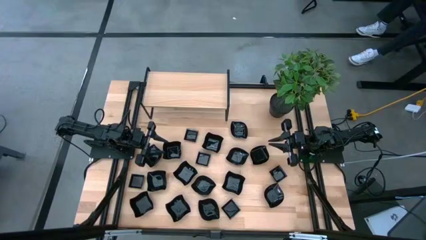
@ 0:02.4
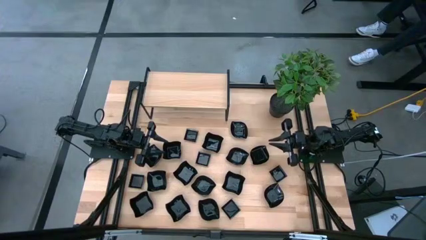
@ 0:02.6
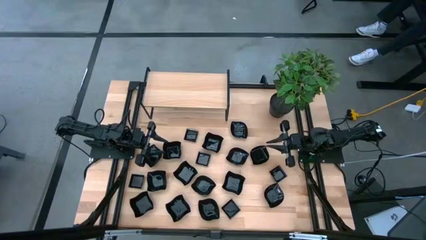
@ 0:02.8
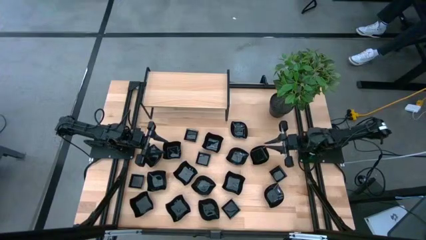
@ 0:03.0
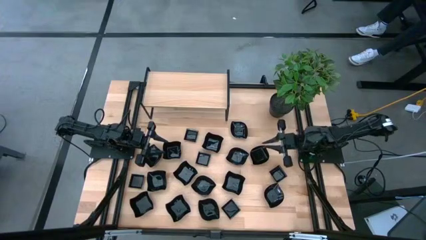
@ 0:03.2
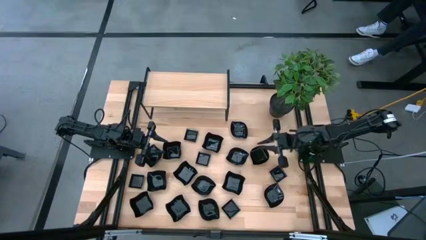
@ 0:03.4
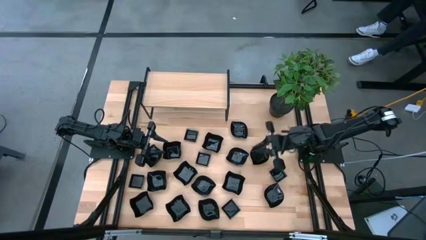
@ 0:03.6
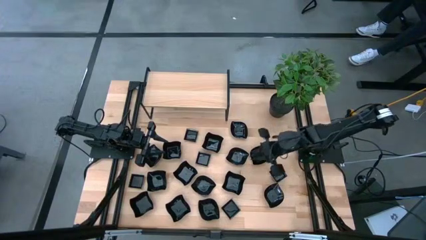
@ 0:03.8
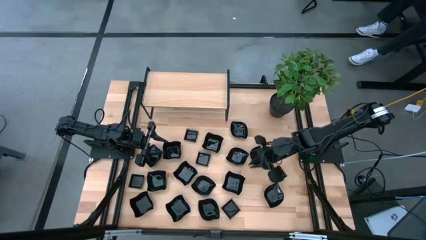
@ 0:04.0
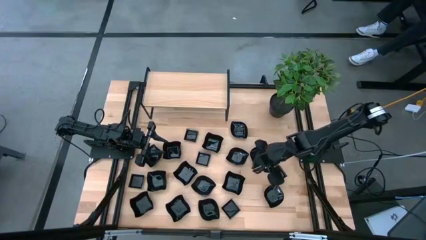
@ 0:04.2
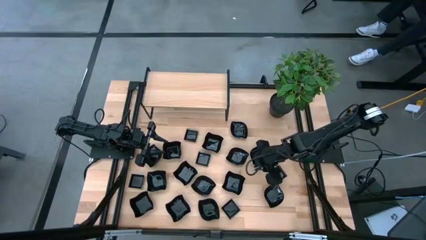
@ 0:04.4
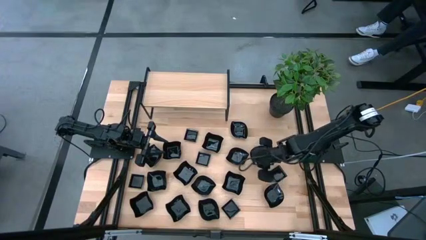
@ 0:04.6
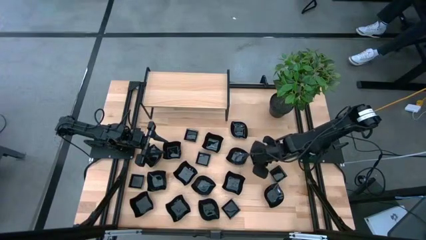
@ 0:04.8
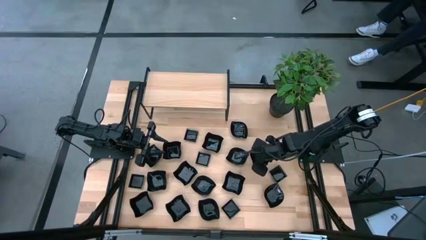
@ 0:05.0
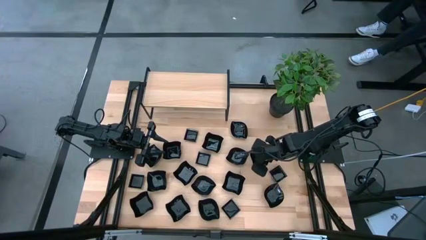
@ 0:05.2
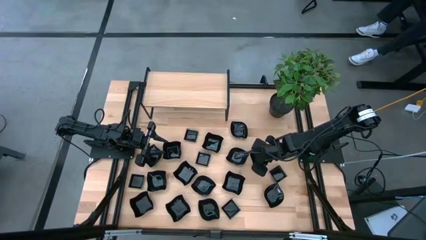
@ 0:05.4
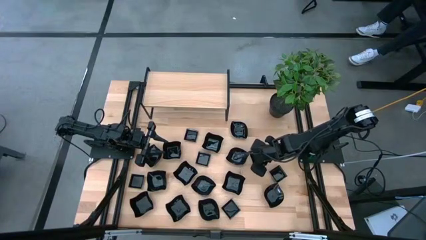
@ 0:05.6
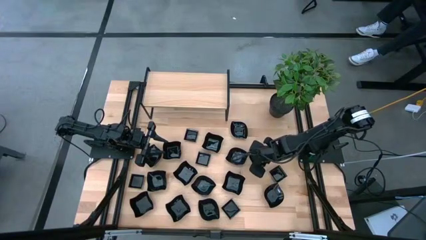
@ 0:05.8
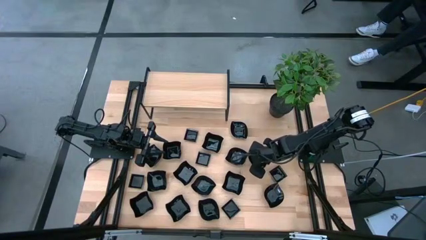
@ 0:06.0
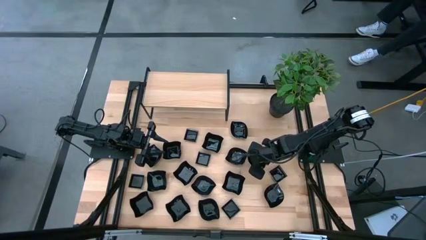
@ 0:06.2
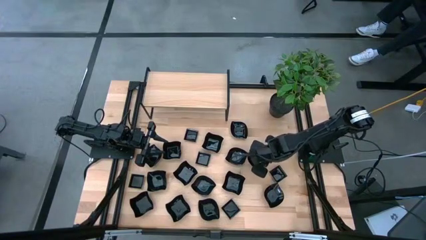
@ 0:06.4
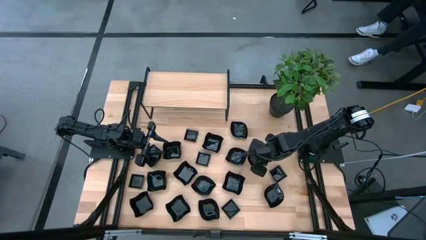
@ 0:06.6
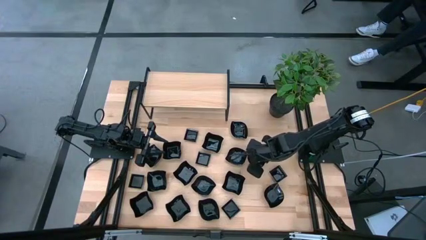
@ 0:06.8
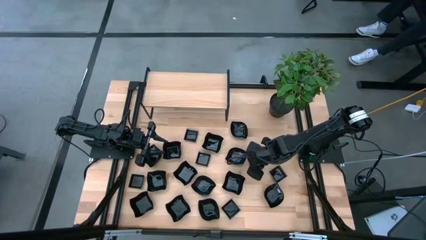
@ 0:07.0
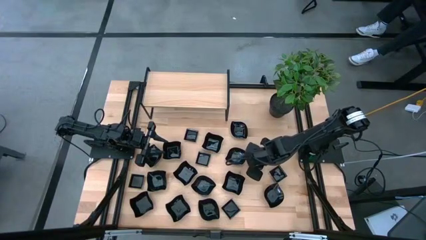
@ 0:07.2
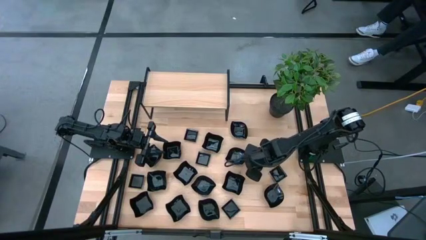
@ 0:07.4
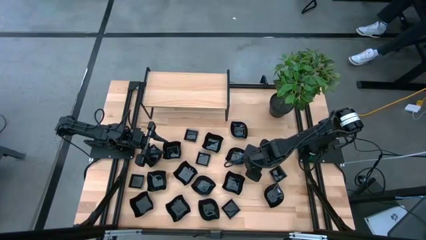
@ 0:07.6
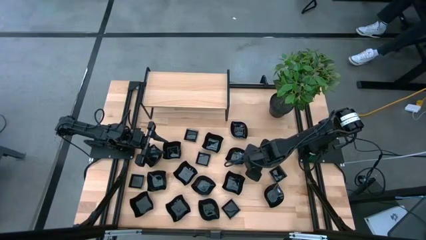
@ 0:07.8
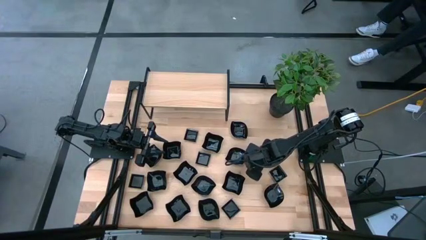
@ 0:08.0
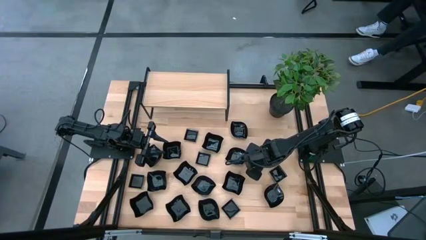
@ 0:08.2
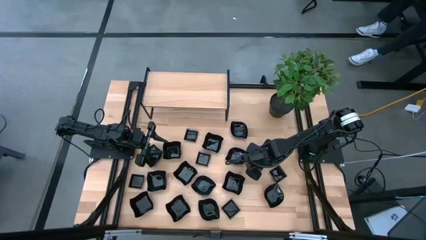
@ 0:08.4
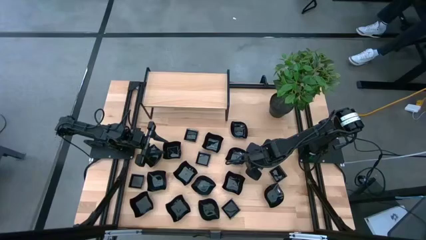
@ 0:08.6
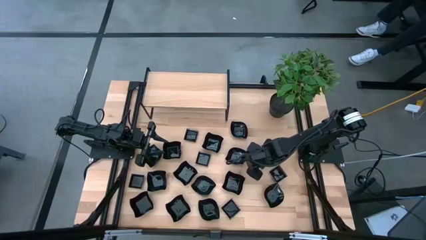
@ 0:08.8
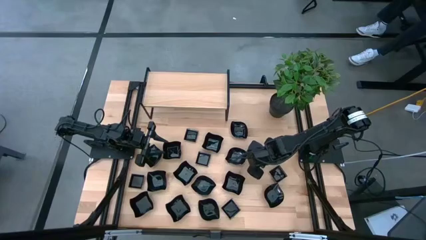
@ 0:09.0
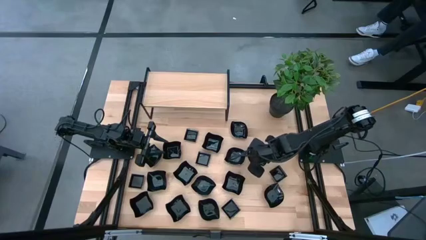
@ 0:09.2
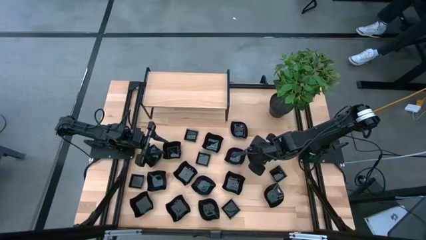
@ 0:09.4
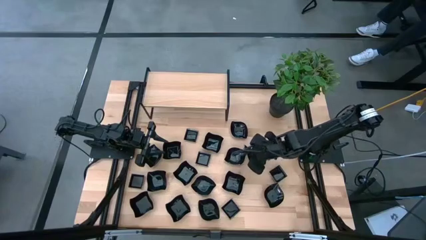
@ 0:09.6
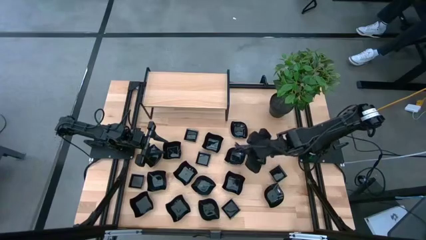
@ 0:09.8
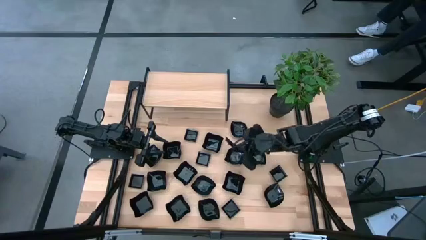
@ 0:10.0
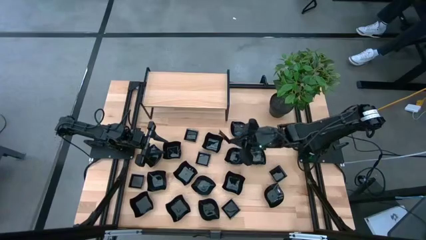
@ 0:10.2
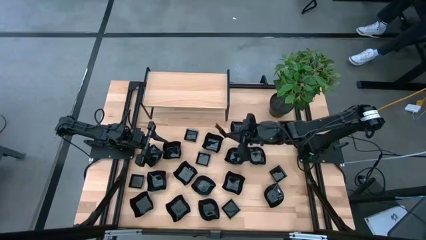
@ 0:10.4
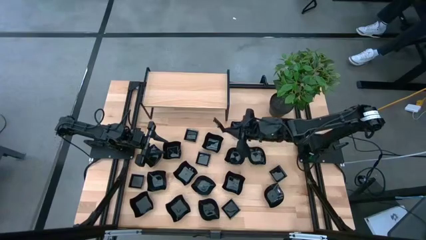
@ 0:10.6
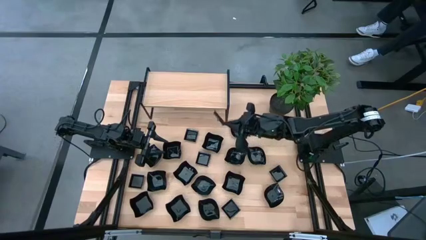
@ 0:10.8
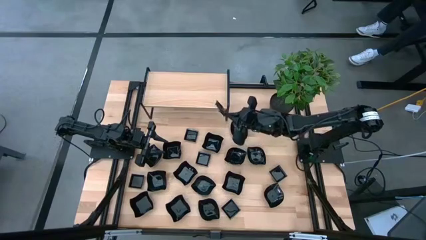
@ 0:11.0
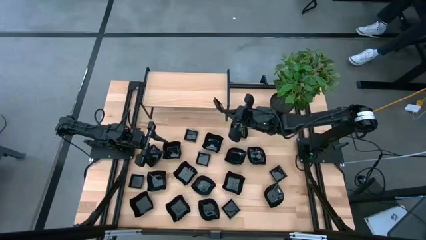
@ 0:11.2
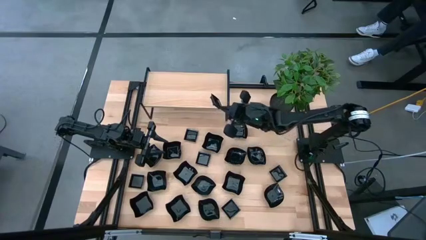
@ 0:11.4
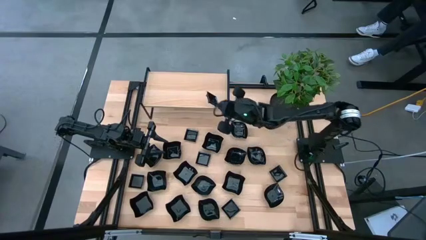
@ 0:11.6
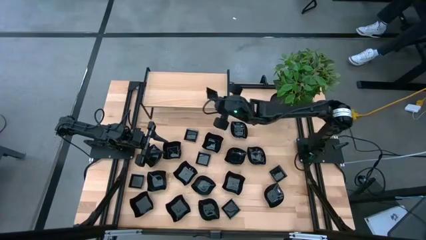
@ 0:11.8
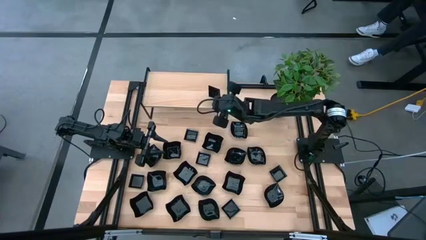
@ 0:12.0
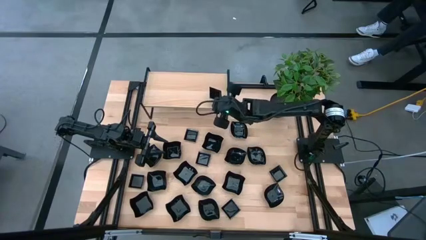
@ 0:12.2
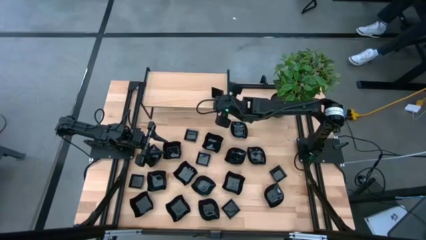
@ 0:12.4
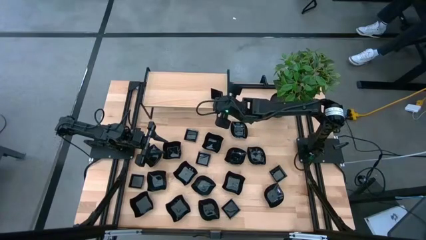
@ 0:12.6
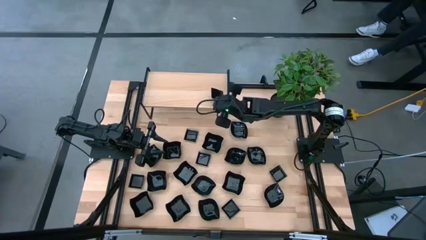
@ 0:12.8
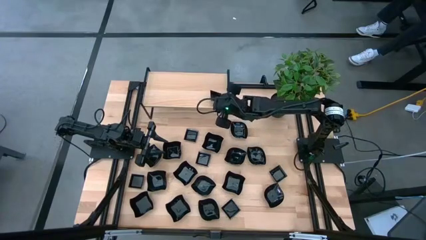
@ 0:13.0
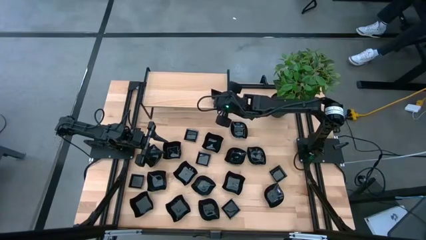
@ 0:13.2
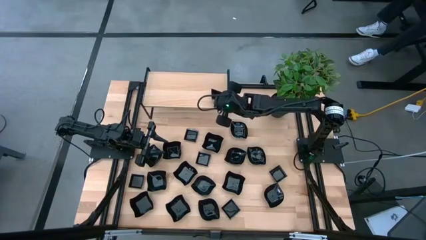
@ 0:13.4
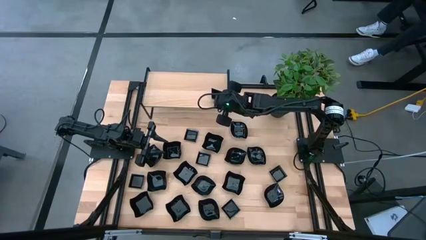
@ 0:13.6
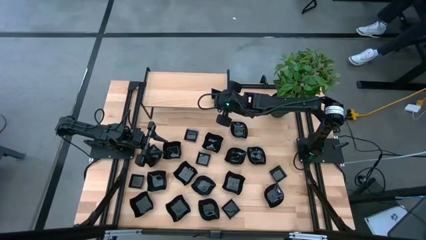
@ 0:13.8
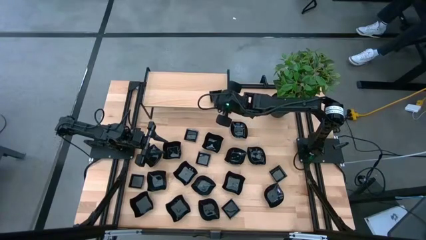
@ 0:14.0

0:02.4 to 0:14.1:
Task: Pick & Place Mini shaped plates
Put the square plate on the shelf
